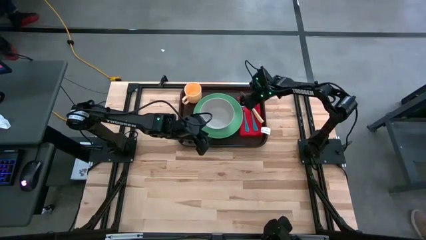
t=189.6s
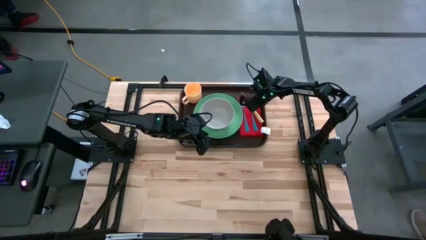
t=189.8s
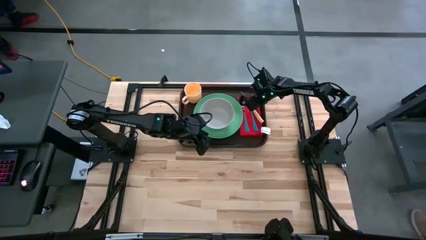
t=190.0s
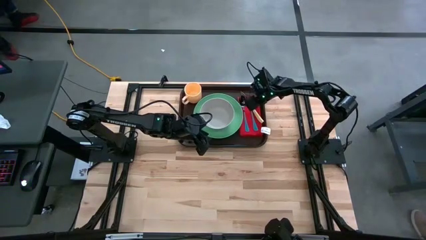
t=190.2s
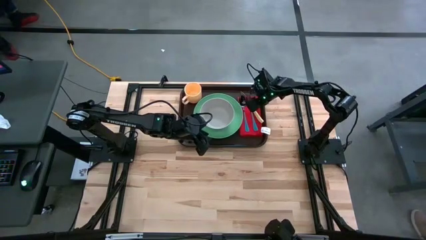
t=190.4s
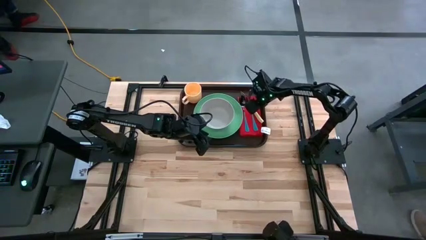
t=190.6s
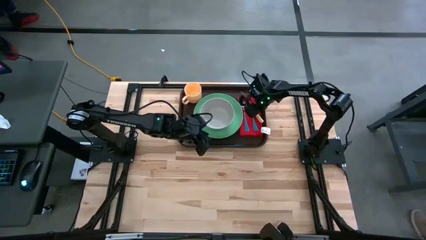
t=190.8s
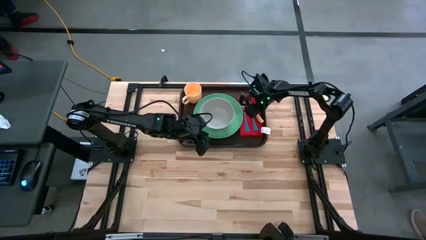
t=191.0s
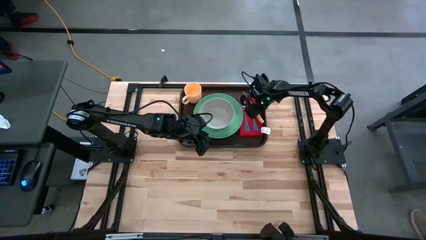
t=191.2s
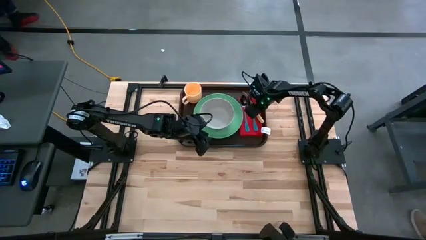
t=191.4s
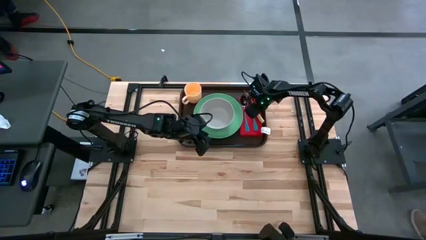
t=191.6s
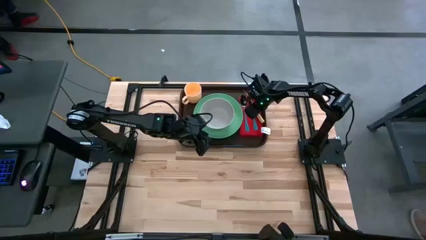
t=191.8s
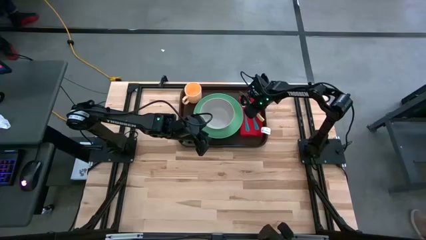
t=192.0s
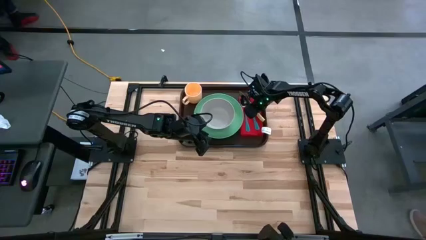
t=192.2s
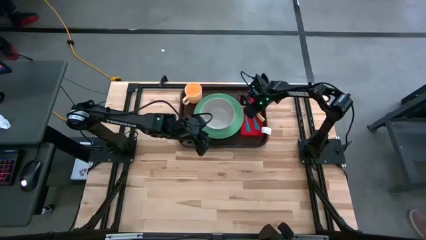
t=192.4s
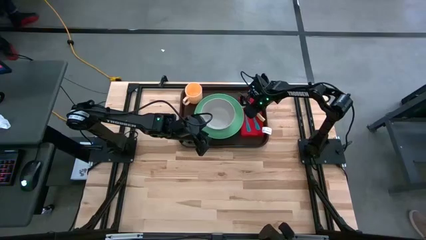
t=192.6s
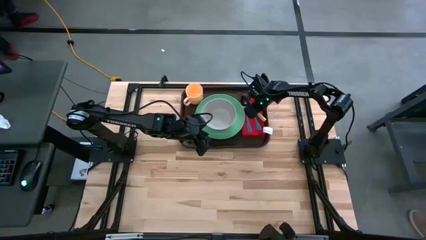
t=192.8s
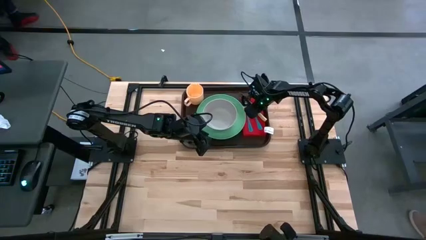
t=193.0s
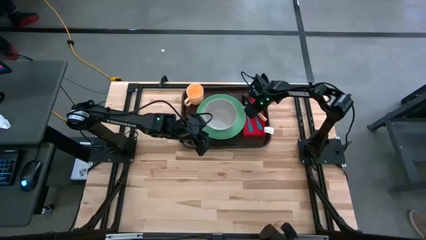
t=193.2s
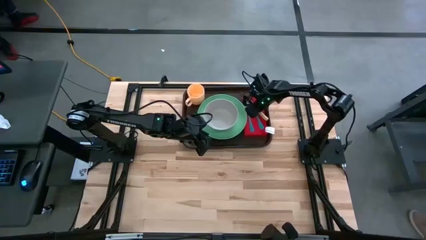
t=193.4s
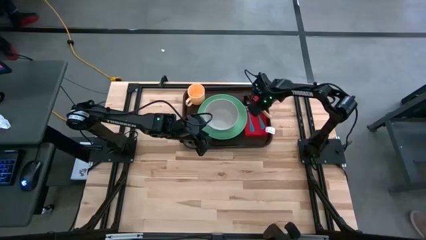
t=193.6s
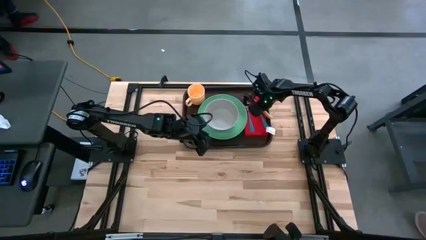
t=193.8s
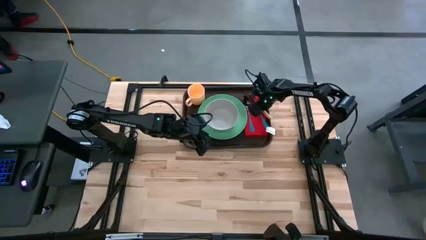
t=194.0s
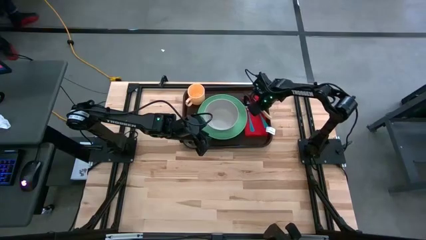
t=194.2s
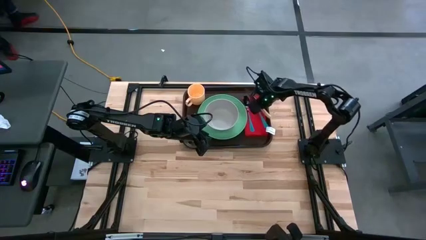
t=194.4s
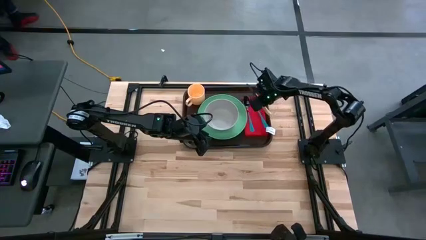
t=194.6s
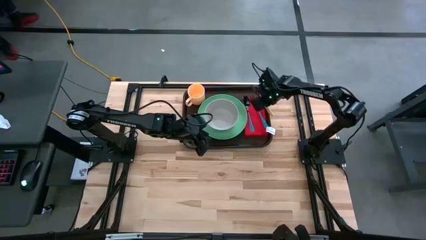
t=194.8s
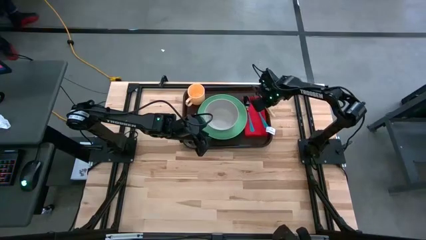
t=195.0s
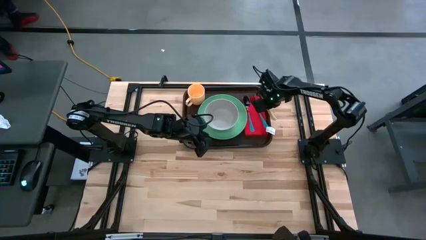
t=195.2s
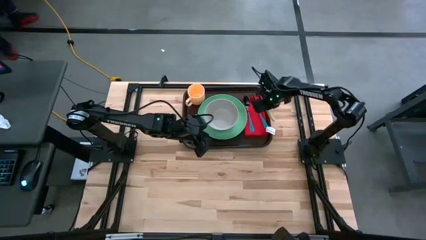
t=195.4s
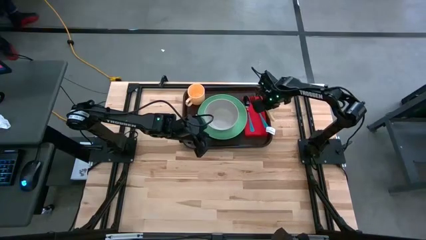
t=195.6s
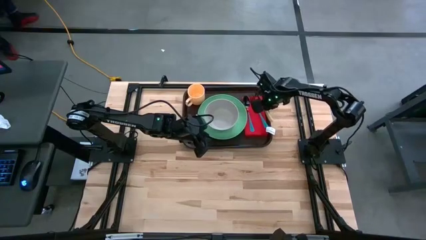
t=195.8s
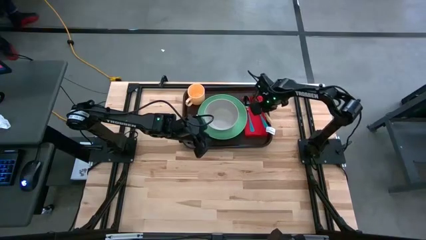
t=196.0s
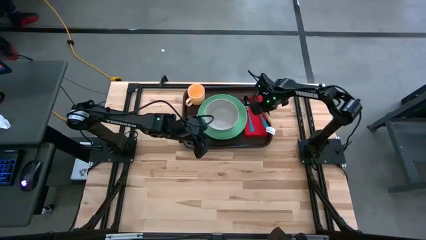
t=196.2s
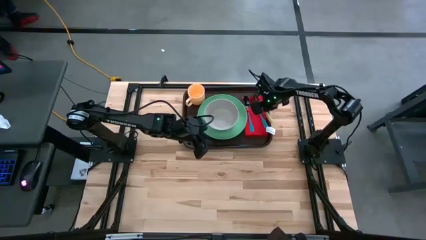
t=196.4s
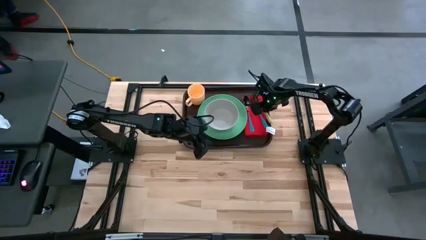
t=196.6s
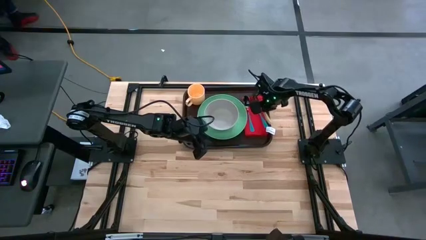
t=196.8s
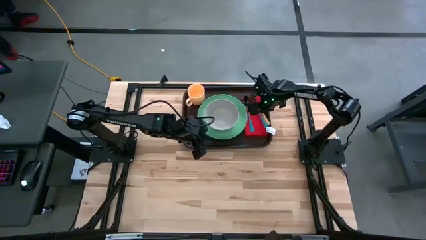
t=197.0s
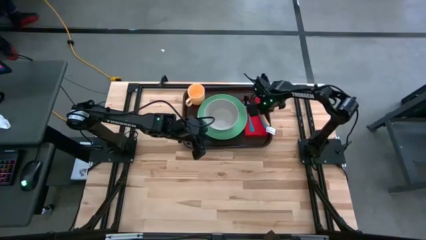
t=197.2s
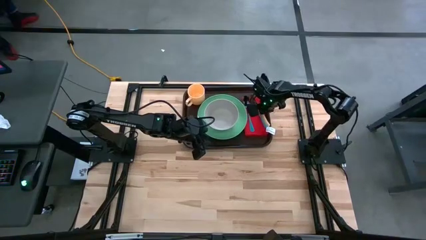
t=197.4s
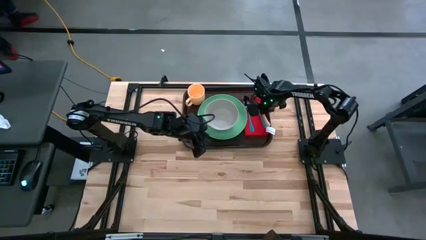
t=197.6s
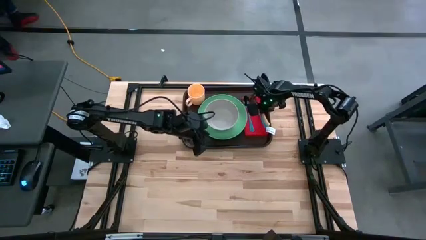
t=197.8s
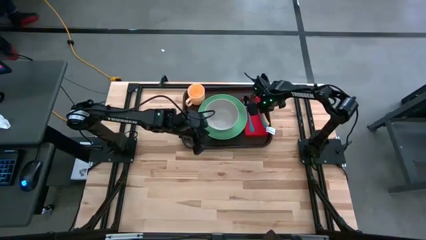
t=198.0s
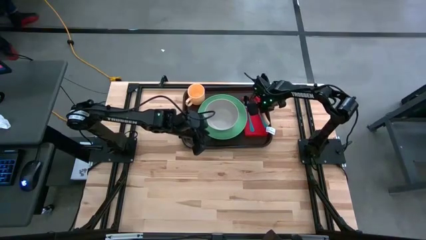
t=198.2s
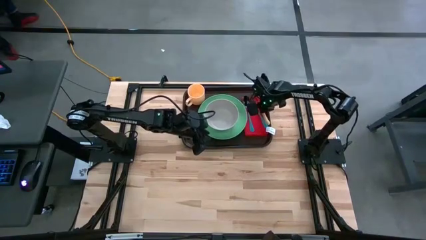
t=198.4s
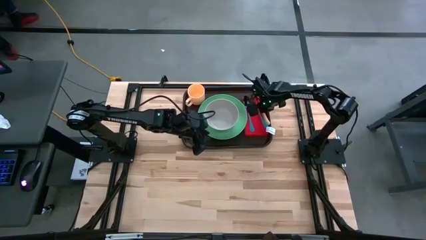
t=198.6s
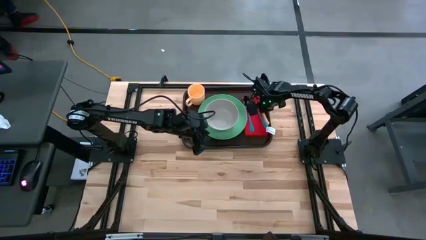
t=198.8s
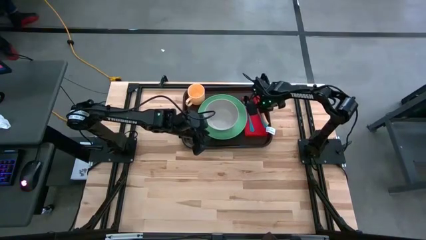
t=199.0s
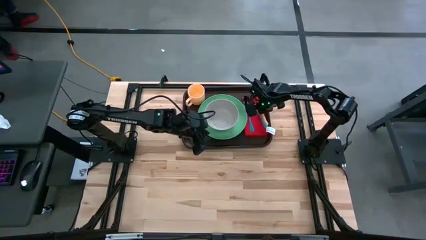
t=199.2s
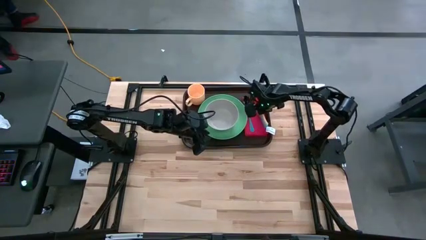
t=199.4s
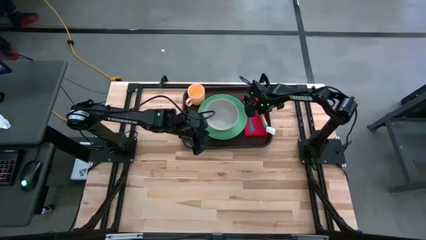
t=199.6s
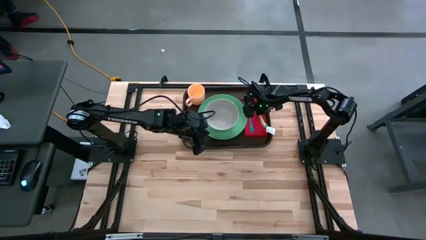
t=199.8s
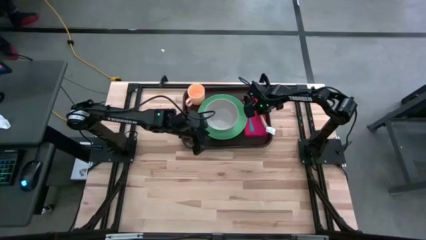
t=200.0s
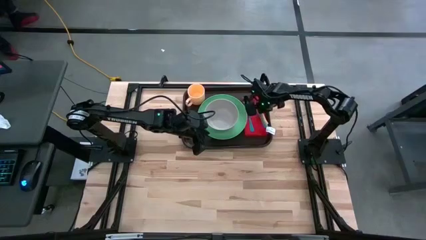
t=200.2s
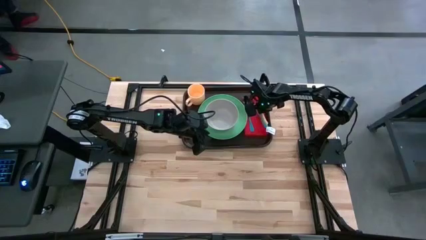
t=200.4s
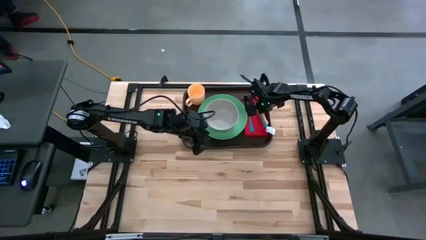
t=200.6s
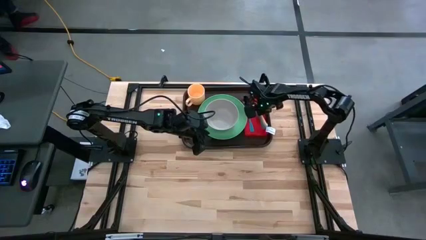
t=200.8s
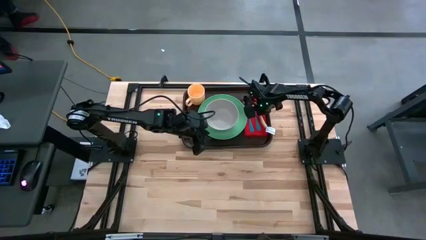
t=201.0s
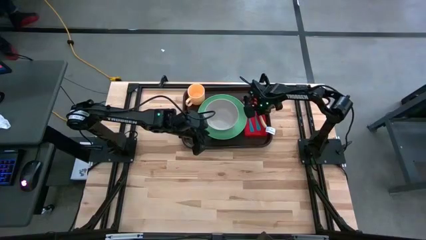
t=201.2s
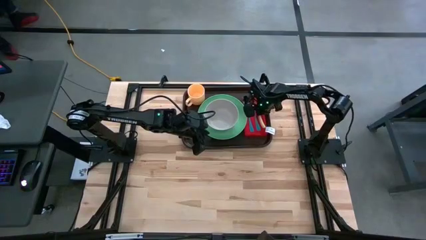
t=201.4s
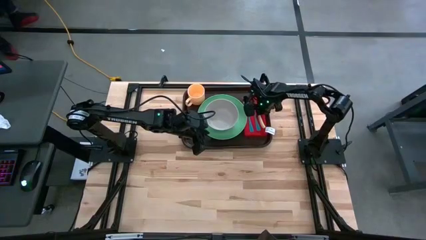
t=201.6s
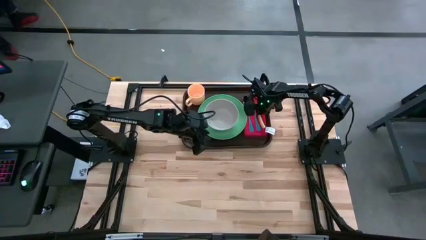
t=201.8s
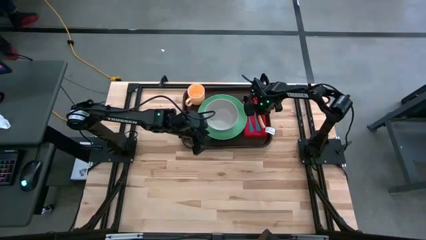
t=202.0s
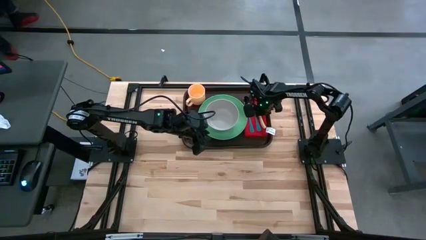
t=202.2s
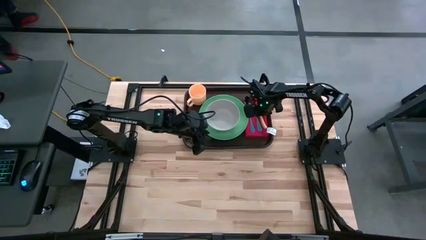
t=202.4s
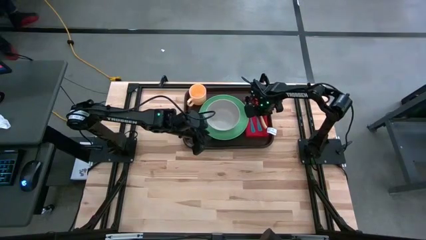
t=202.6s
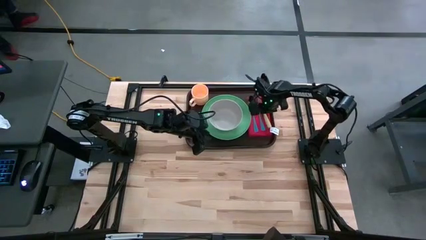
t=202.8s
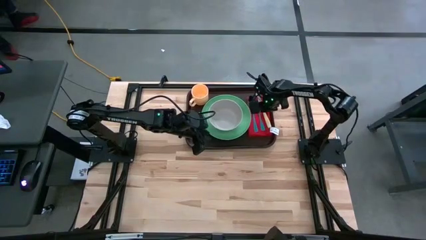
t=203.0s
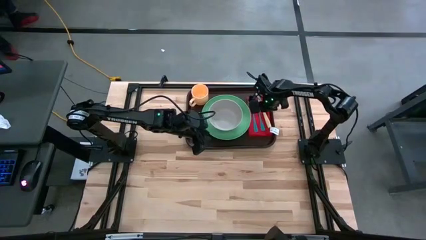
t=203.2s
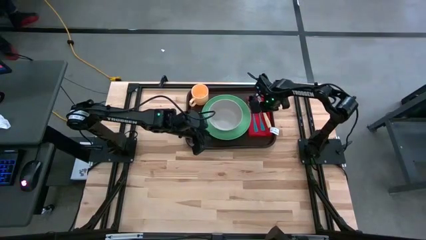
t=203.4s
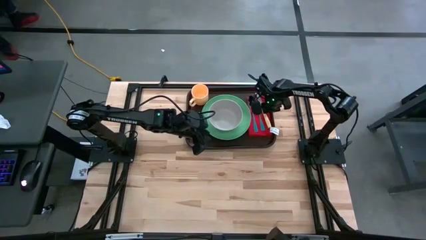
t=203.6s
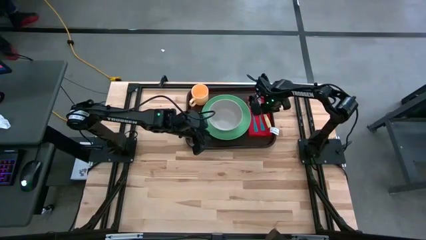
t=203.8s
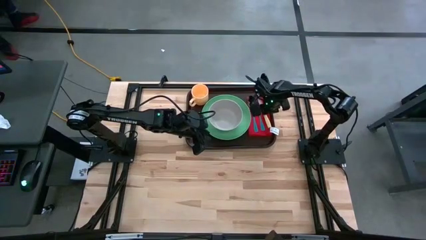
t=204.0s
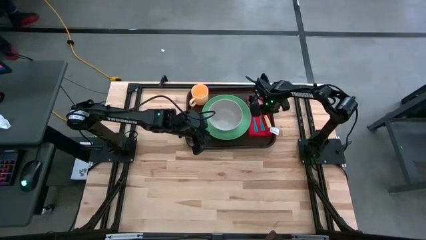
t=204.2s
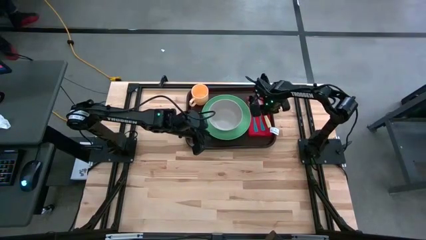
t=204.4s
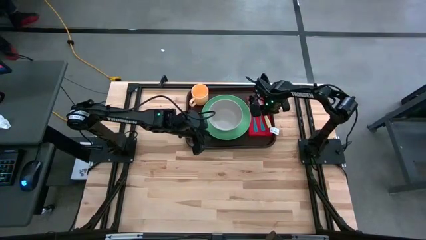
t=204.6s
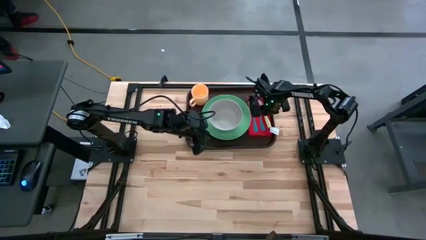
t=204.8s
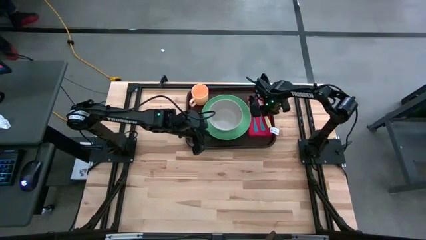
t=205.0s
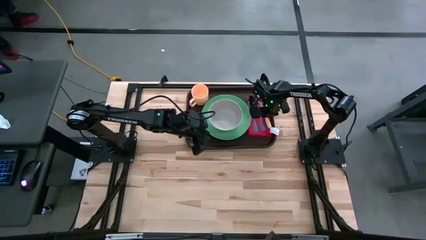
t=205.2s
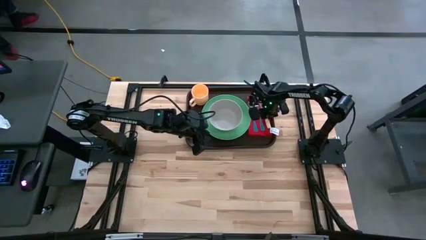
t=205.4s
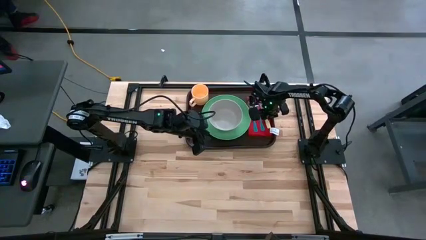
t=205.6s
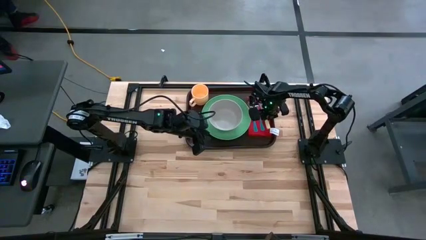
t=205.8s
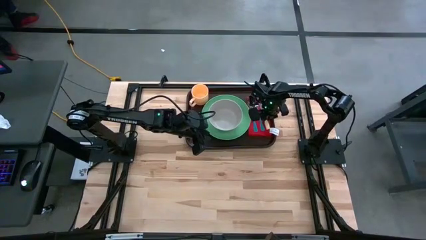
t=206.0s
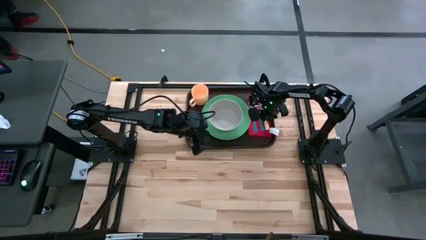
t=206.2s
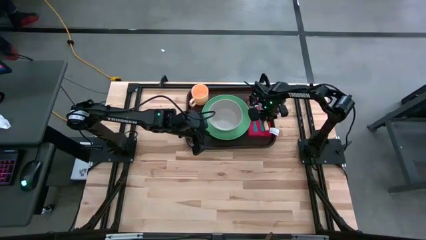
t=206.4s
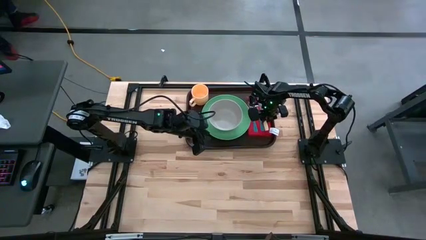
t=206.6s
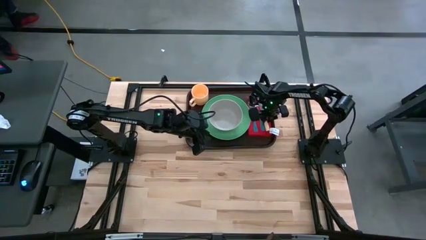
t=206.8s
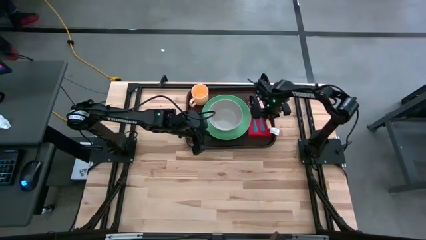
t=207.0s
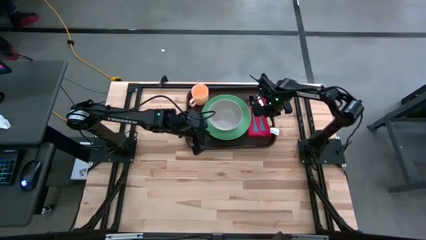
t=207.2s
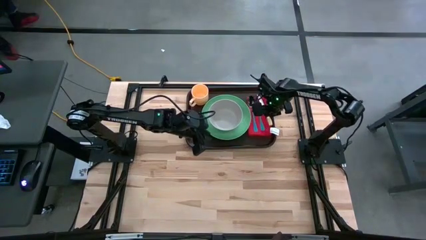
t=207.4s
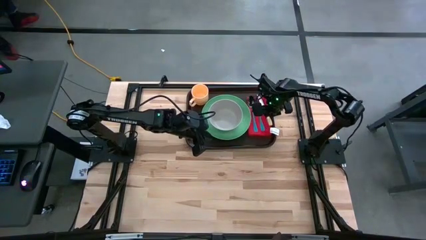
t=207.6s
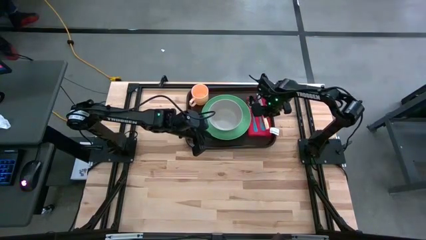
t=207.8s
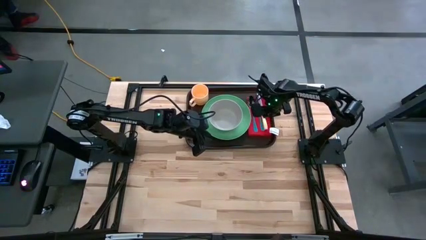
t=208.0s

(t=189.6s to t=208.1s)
Task: Set up tray
Put the yellow knife on top of the red napkin to the right of the blue fork
